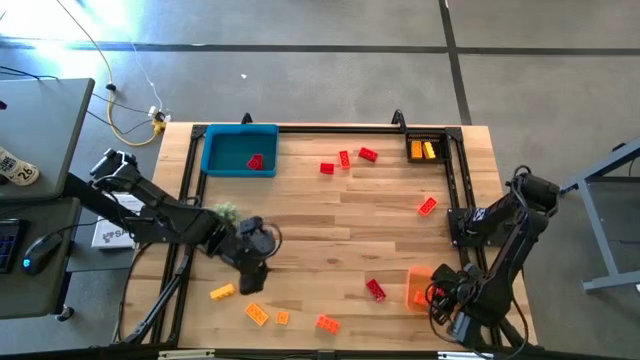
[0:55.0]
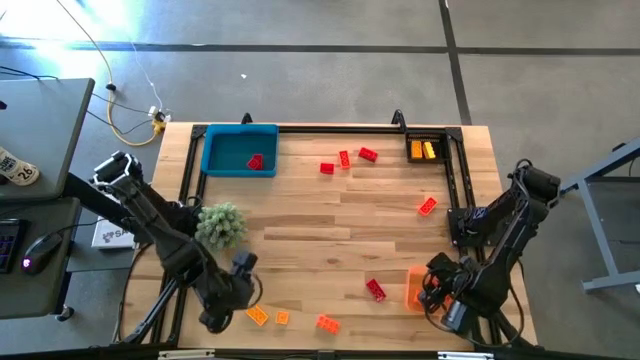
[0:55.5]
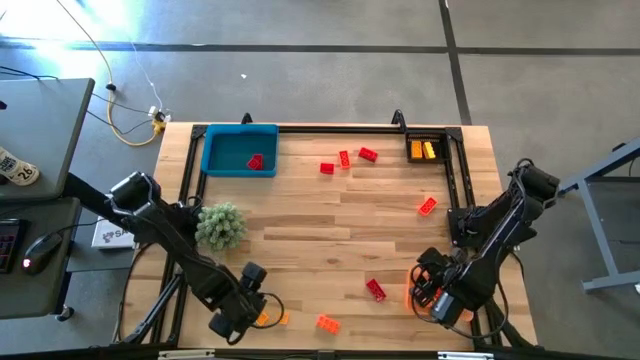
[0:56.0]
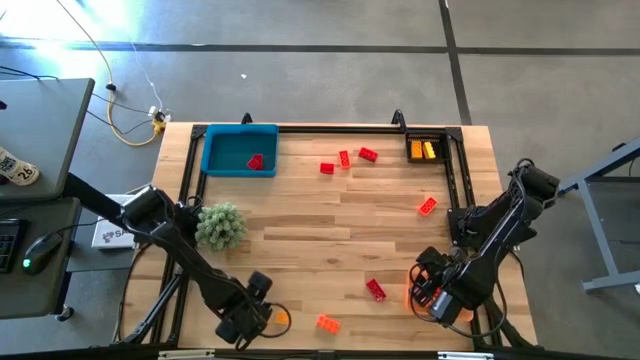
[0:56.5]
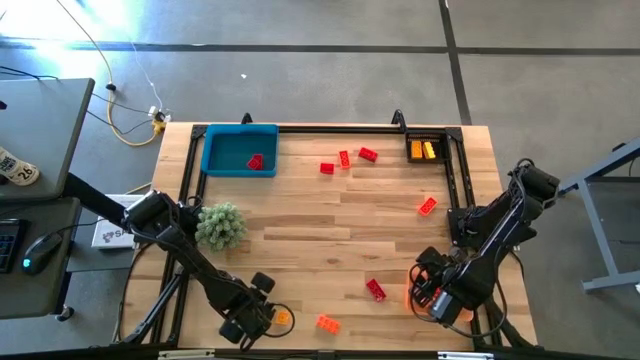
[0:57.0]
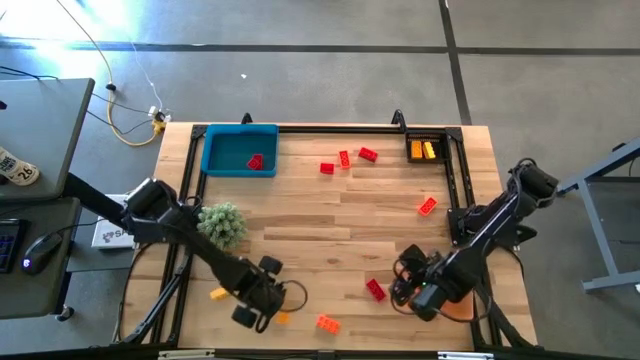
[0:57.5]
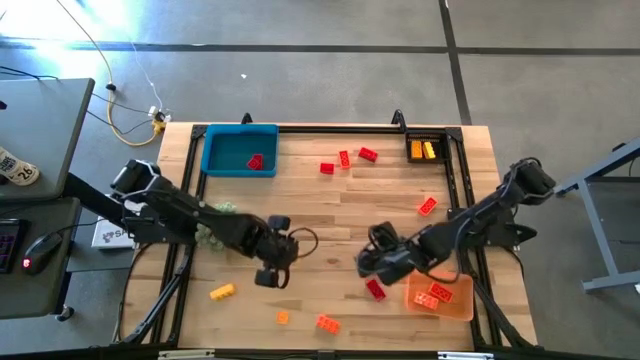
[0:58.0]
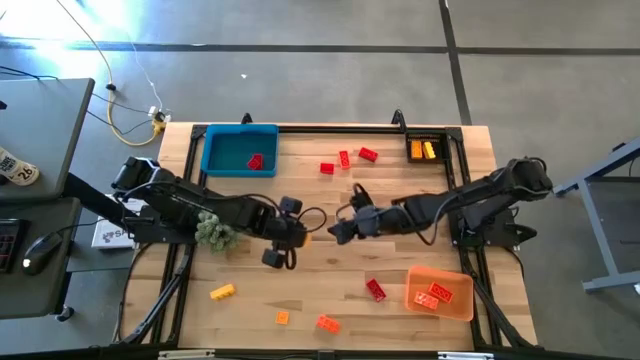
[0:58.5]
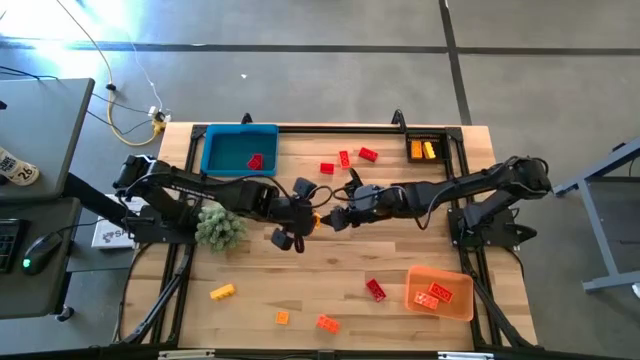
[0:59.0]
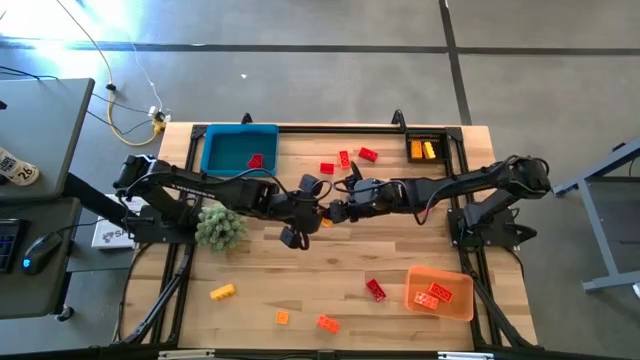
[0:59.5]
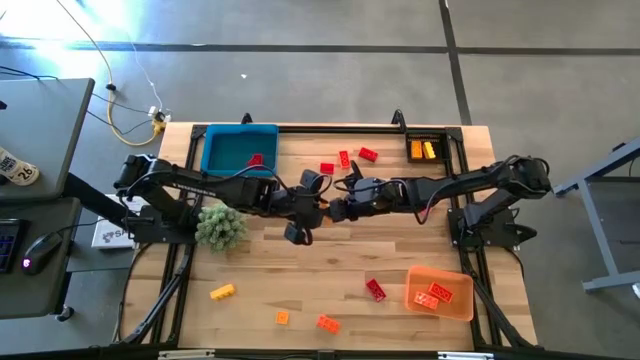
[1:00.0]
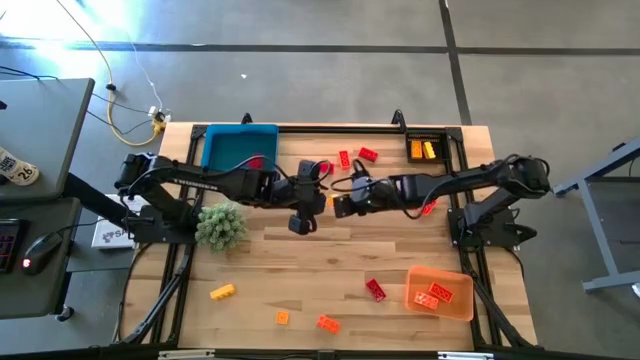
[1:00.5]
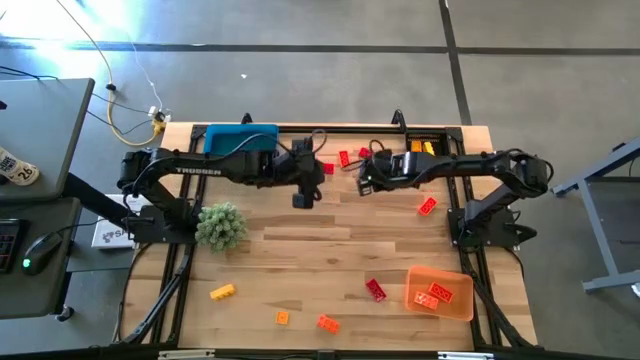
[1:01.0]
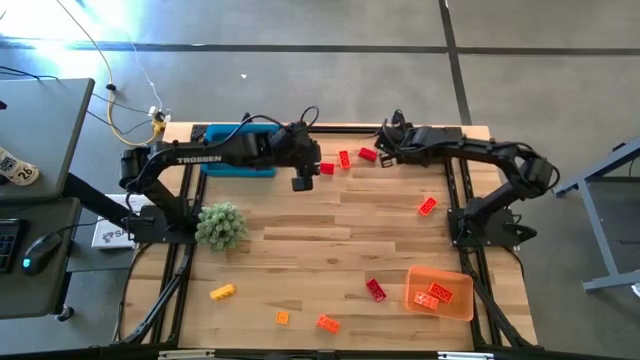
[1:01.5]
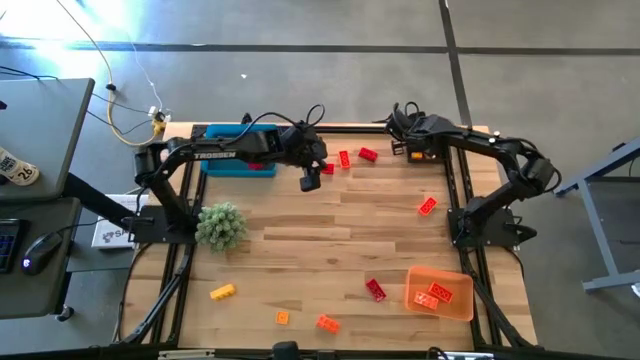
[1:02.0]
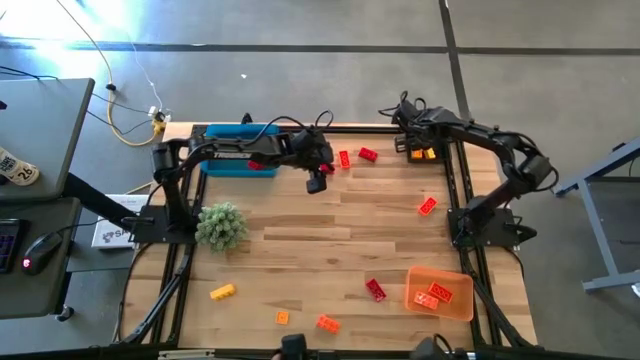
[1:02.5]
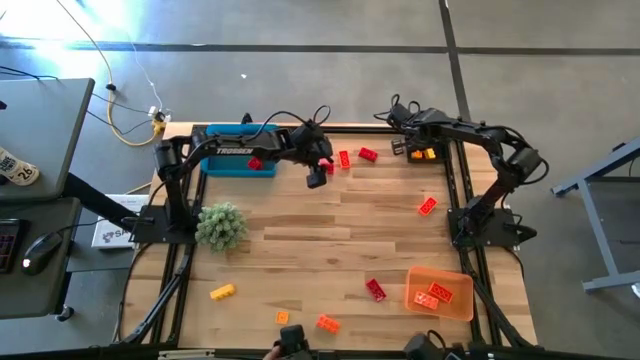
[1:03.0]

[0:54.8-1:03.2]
Task: Sort & place blocks by color
Put the yellow game piece into the black bin

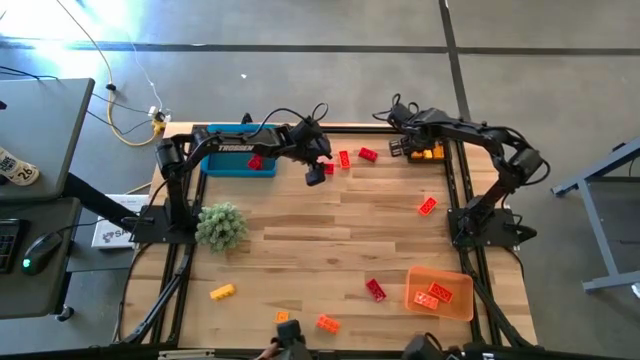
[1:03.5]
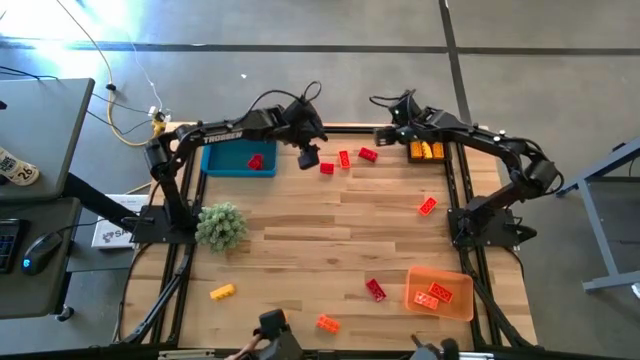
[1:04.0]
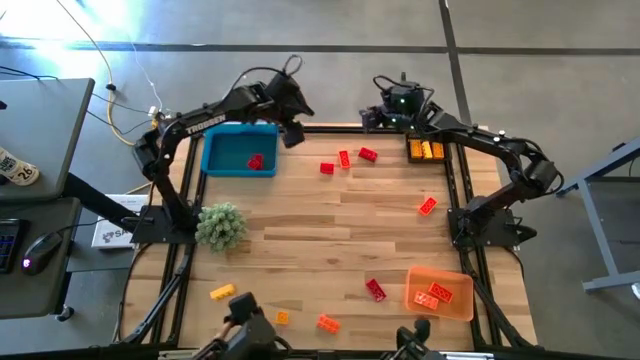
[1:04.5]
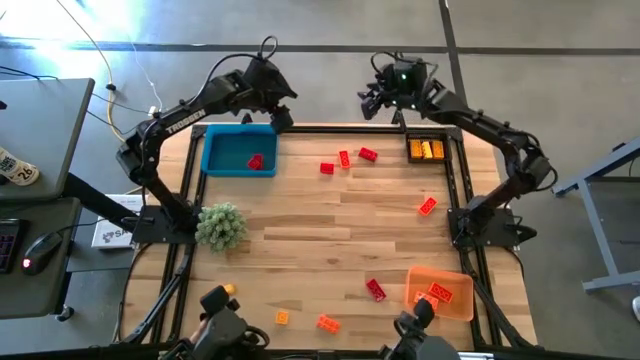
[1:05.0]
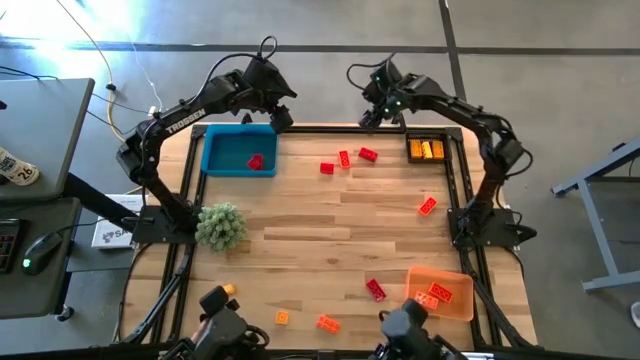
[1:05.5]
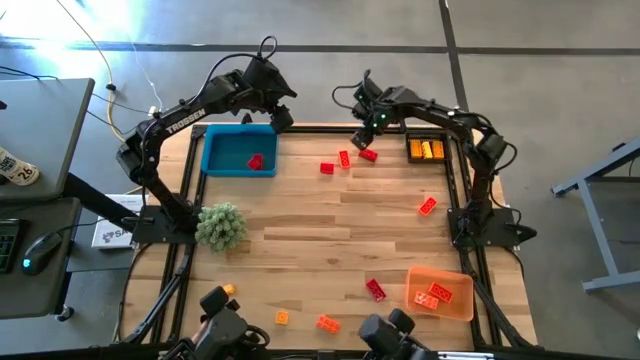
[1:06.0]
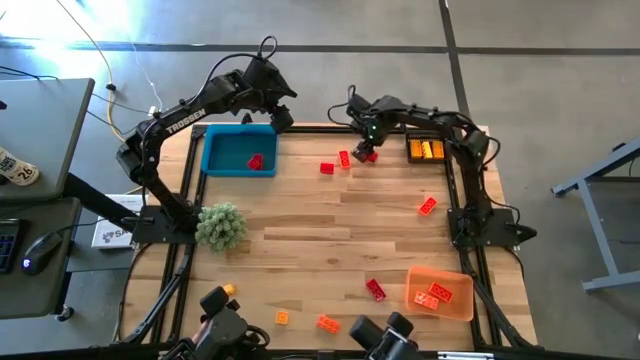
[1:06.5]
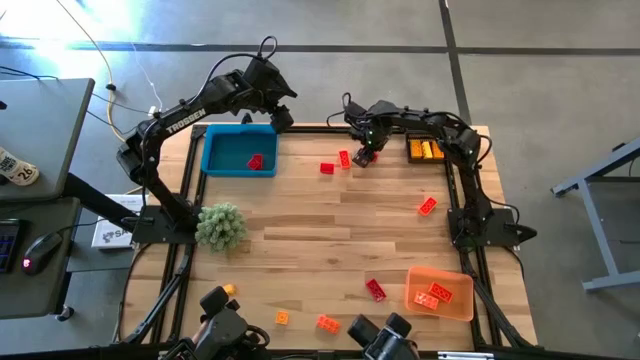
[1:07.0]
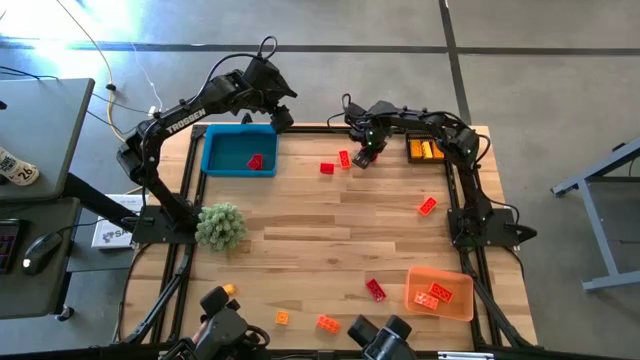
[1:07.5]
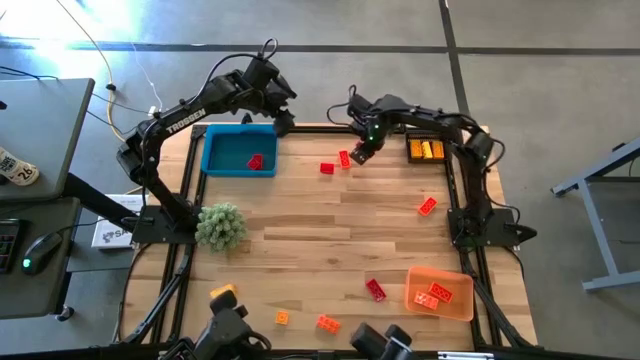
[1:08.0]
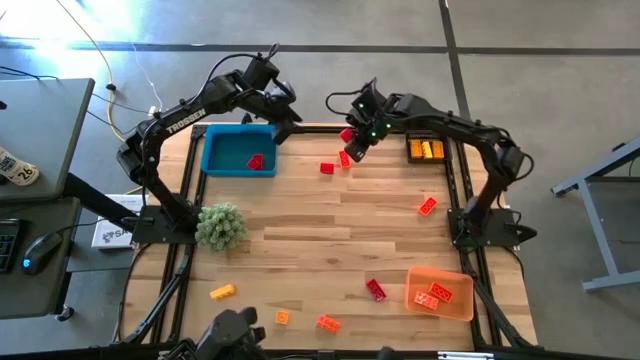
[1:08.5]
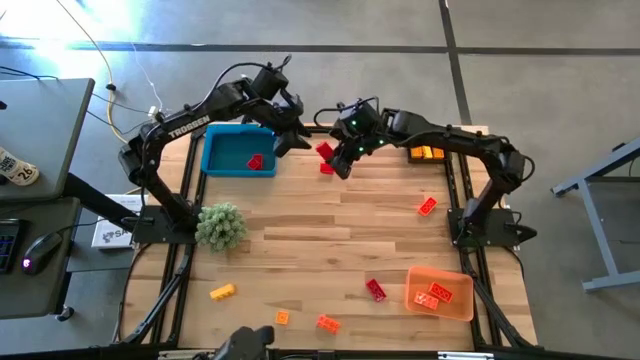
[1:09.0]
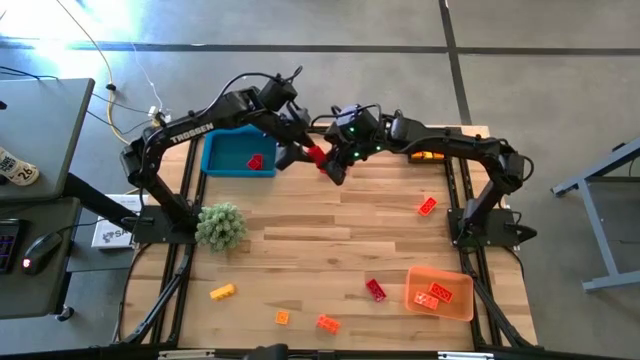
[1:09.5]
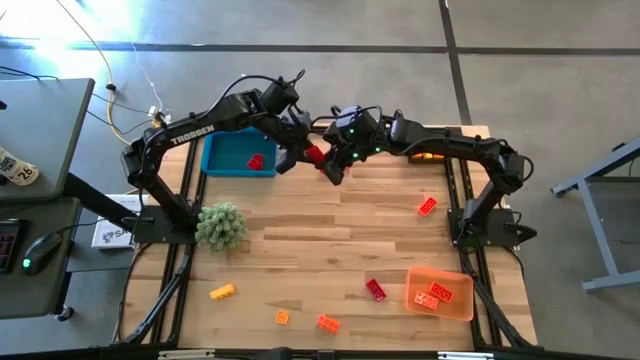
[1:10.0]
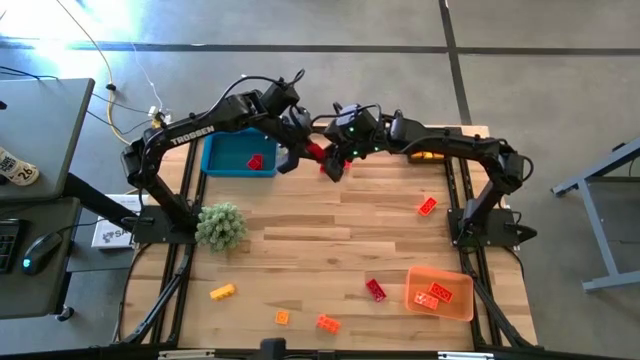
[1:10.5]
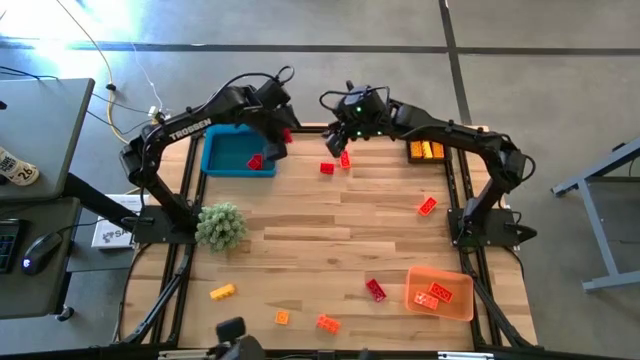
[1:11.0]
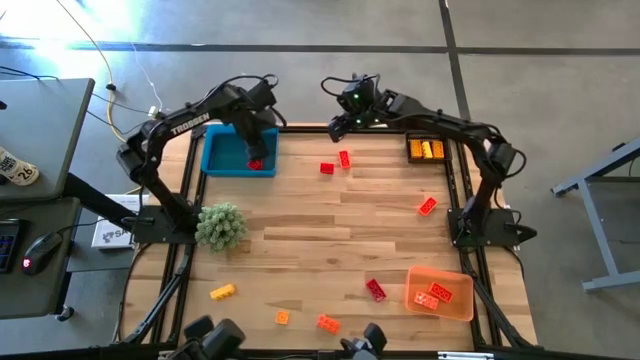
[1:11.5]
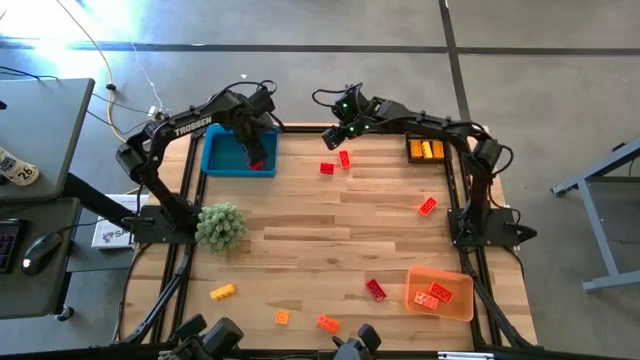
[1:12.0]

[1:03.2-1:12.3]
Put the red game piece into the blue bin

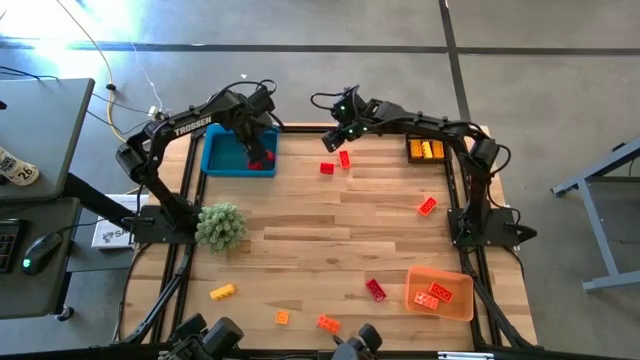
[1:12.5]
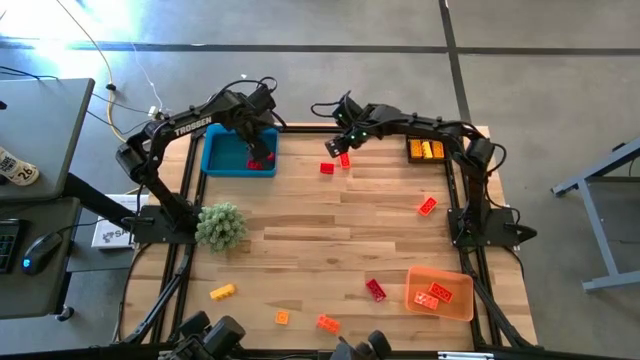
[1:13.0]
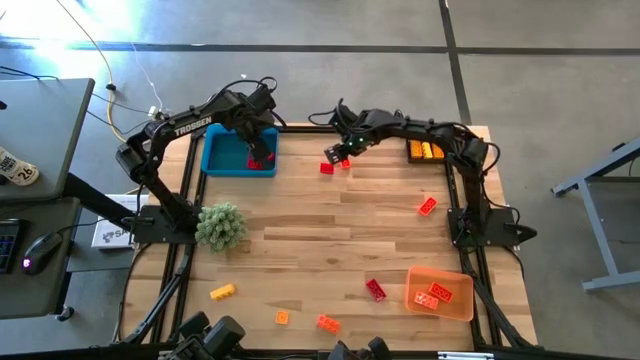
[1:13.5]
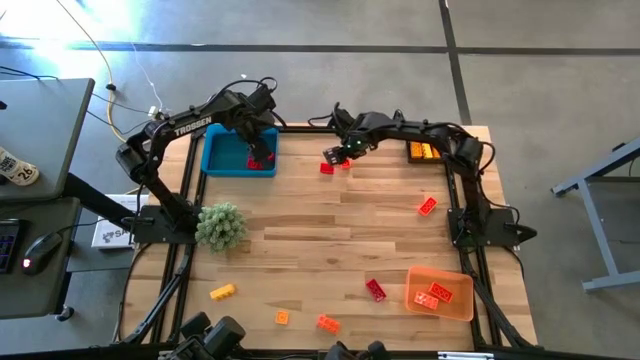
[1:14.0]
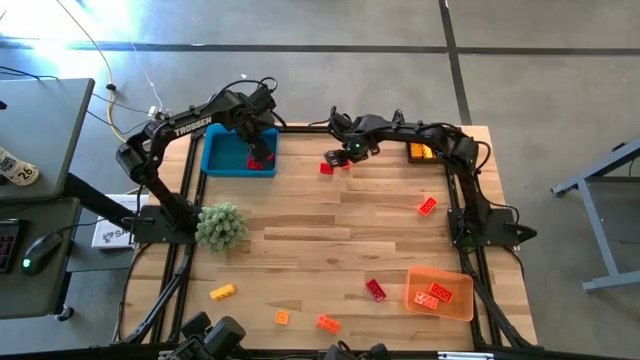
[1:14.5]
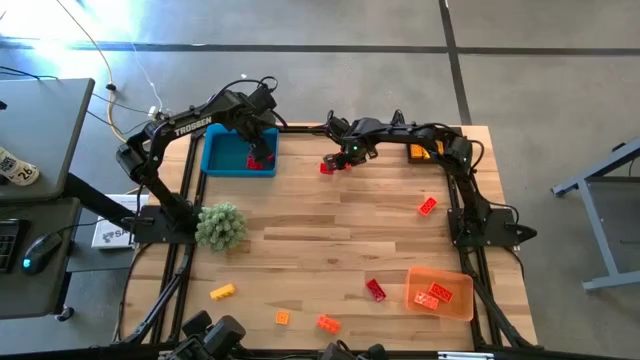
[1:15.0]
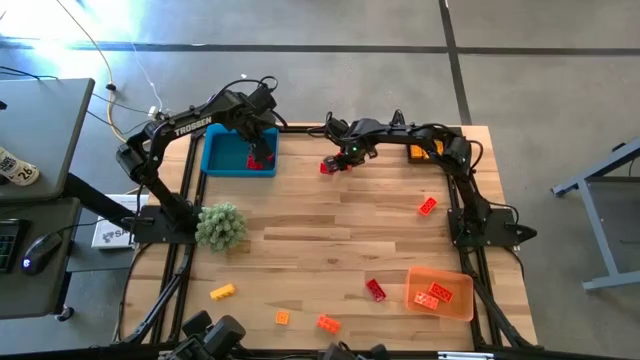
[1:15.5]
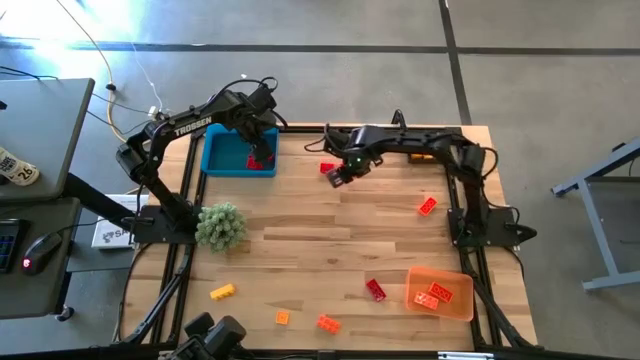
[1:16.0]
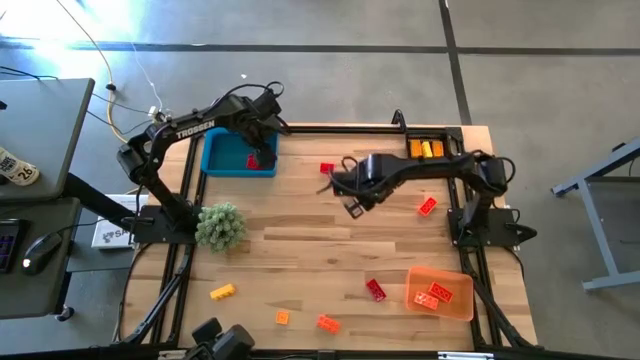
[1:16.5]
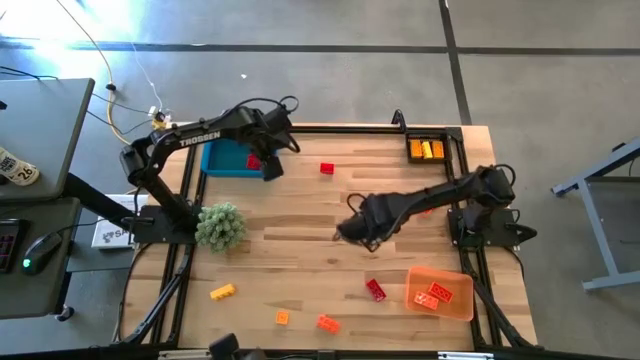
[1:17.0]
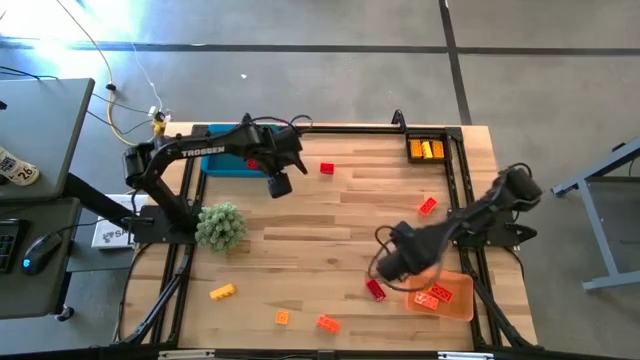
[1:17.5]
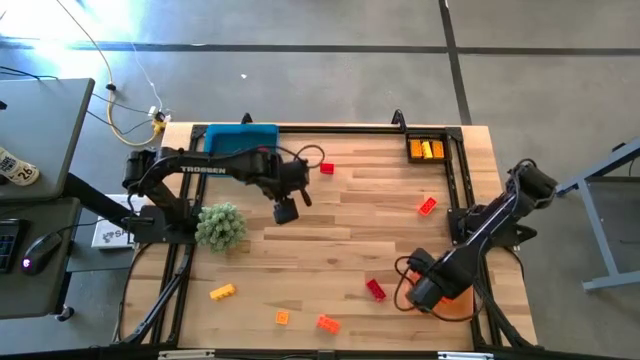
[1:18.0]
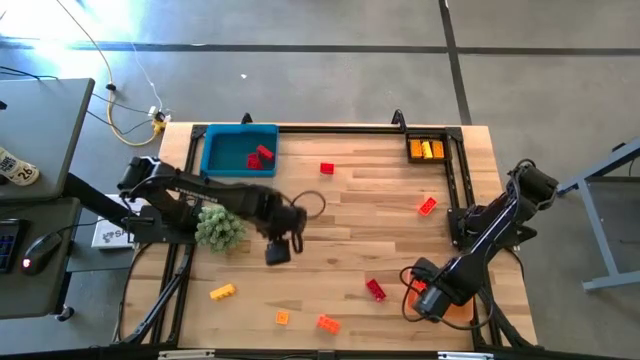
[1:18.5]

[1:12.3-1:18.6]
Put the orange game piece into the orange bin
